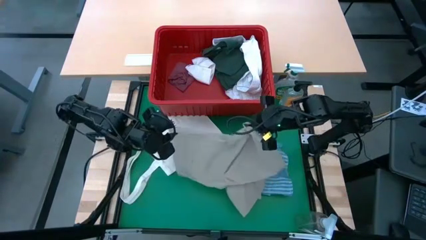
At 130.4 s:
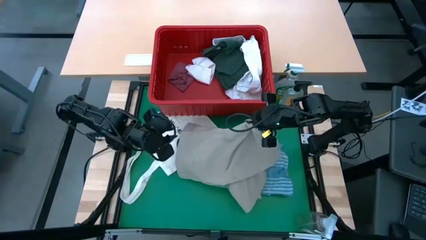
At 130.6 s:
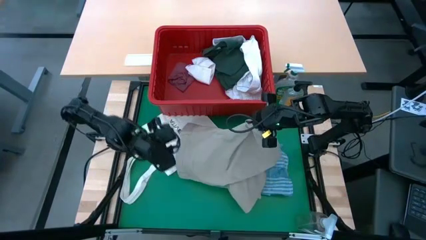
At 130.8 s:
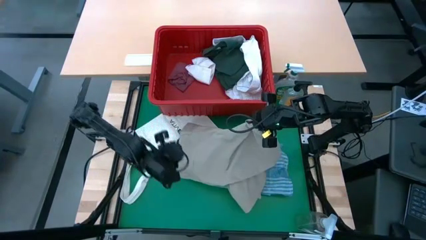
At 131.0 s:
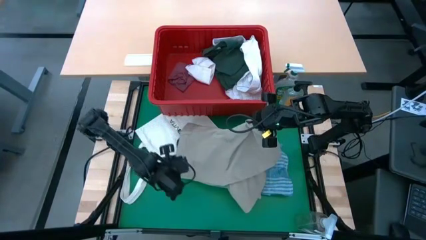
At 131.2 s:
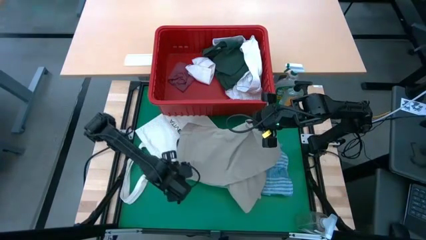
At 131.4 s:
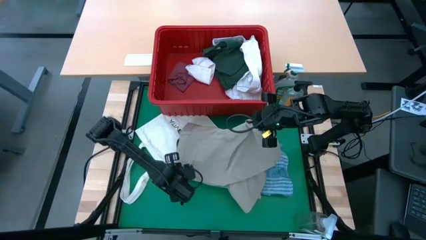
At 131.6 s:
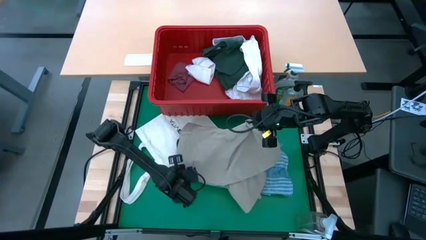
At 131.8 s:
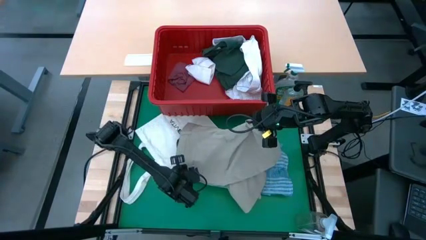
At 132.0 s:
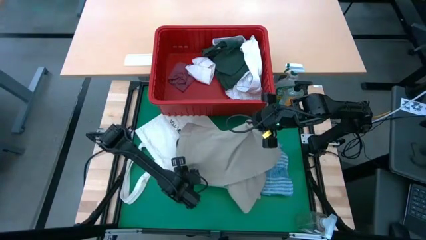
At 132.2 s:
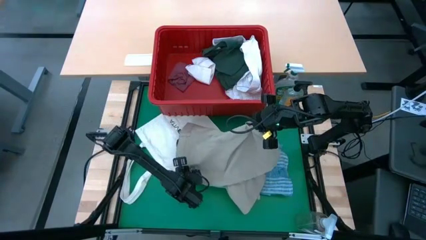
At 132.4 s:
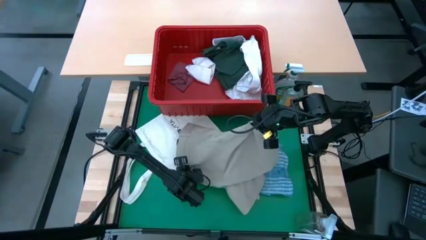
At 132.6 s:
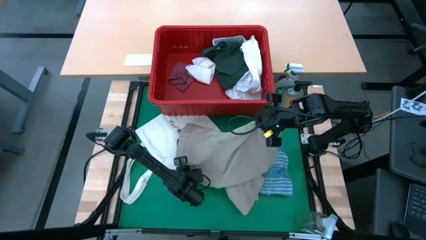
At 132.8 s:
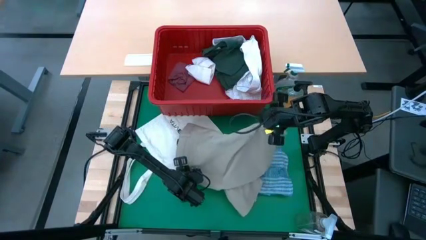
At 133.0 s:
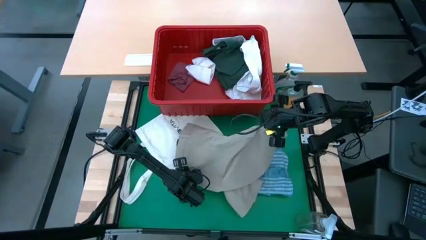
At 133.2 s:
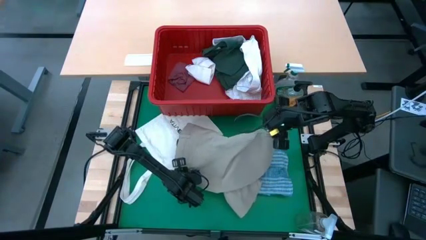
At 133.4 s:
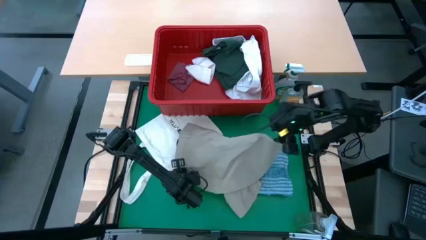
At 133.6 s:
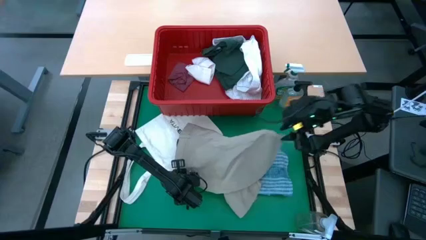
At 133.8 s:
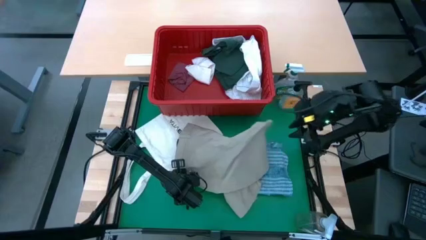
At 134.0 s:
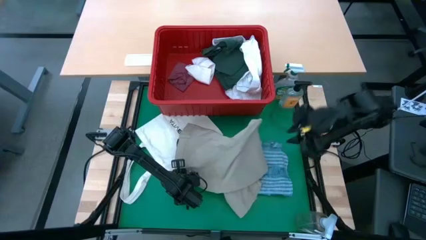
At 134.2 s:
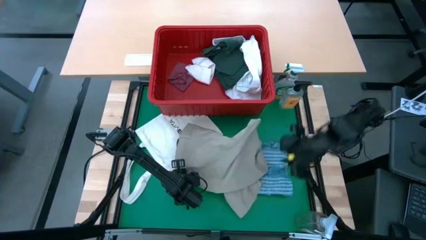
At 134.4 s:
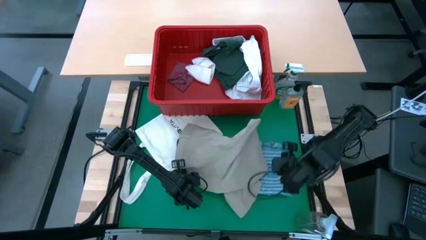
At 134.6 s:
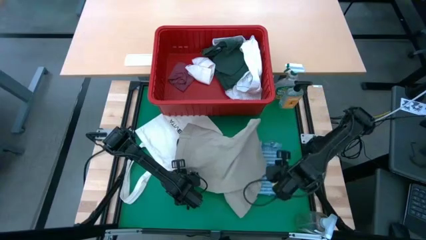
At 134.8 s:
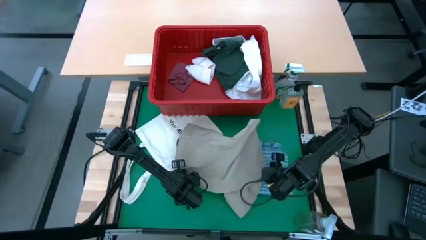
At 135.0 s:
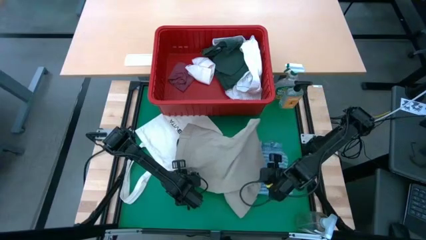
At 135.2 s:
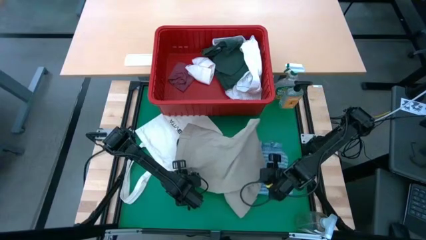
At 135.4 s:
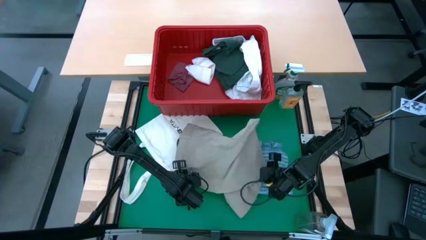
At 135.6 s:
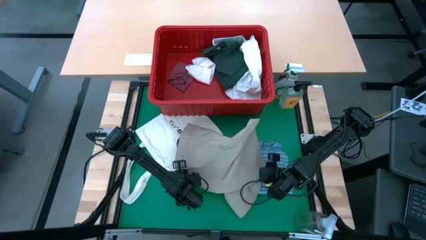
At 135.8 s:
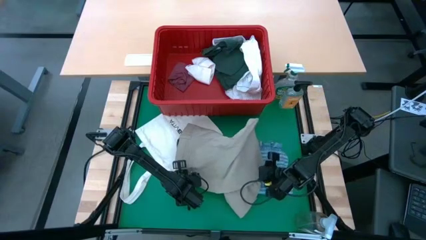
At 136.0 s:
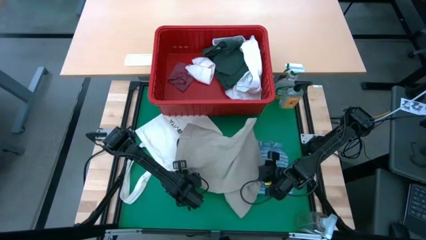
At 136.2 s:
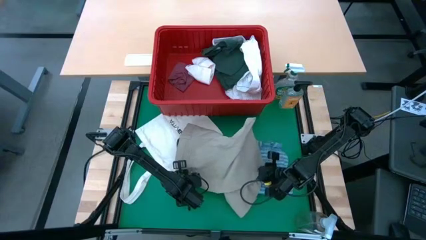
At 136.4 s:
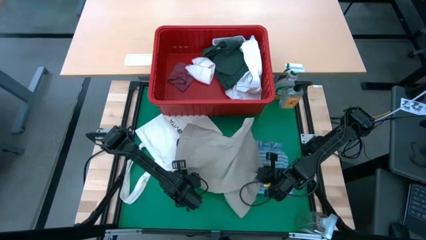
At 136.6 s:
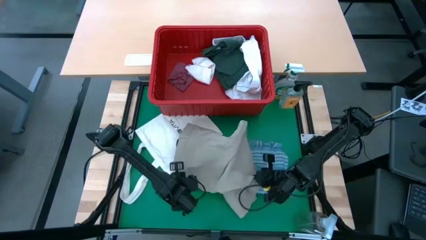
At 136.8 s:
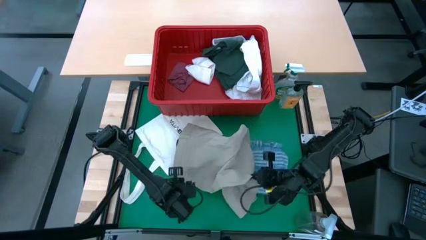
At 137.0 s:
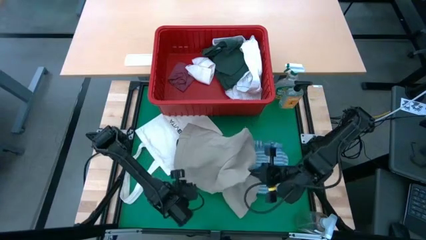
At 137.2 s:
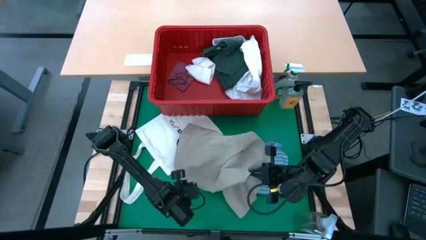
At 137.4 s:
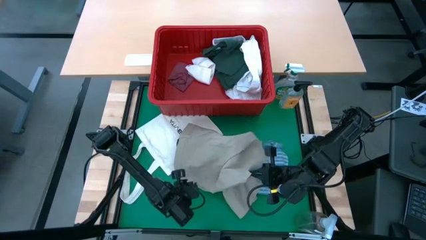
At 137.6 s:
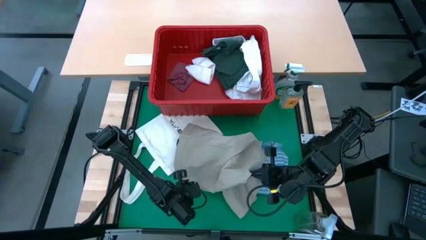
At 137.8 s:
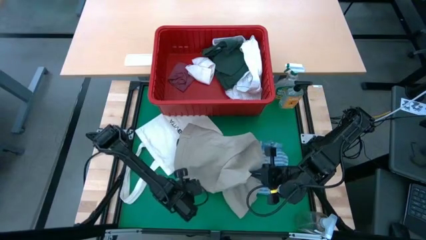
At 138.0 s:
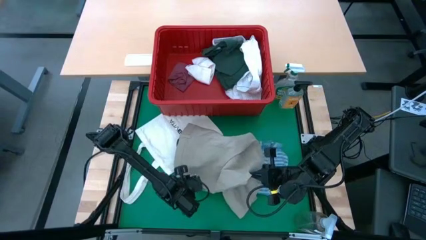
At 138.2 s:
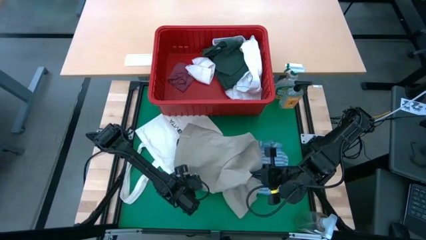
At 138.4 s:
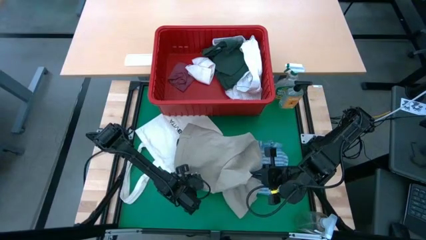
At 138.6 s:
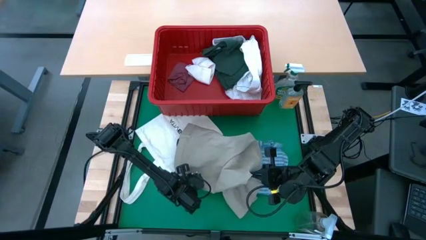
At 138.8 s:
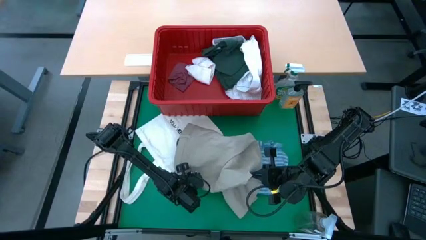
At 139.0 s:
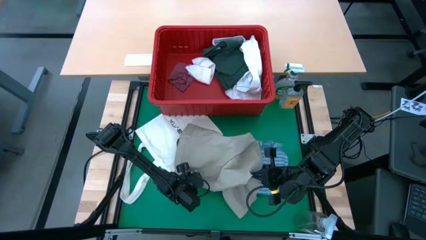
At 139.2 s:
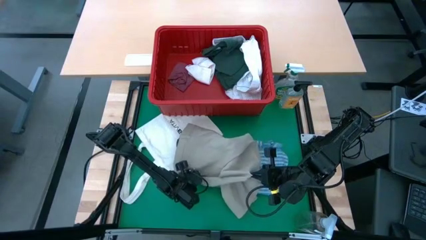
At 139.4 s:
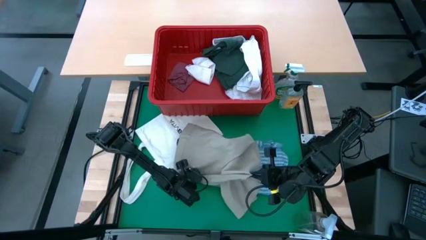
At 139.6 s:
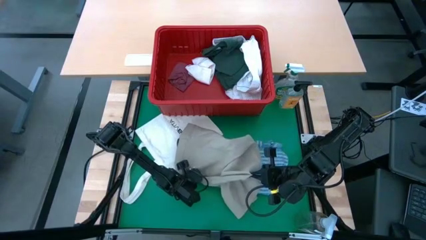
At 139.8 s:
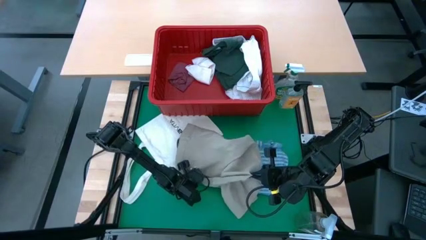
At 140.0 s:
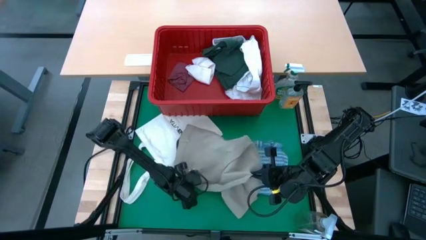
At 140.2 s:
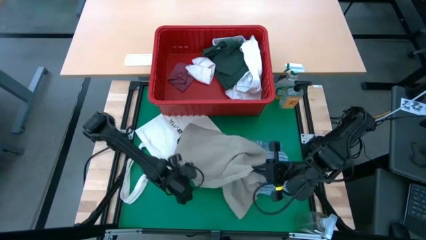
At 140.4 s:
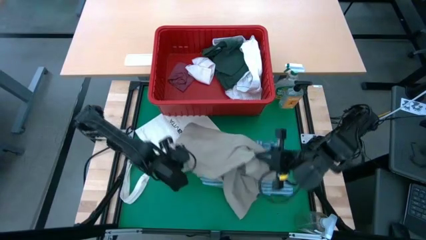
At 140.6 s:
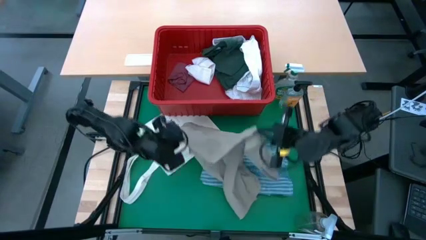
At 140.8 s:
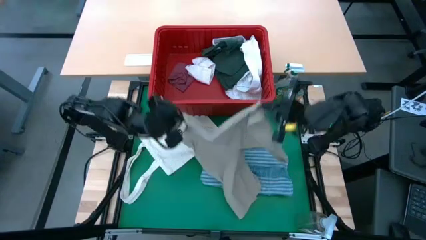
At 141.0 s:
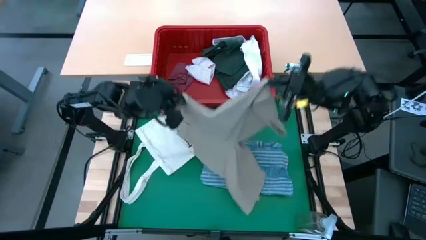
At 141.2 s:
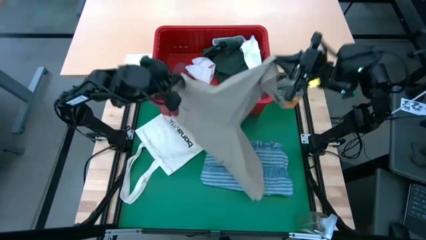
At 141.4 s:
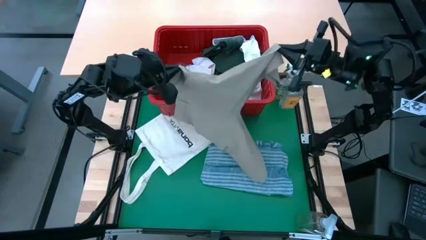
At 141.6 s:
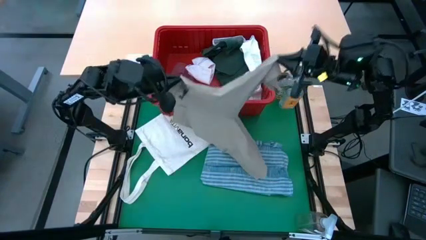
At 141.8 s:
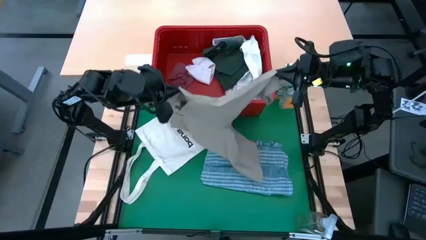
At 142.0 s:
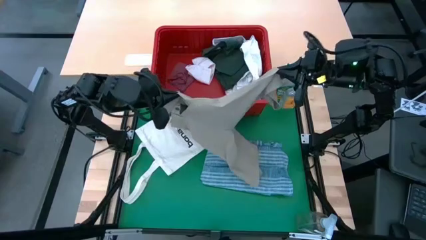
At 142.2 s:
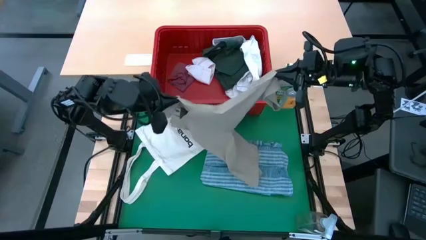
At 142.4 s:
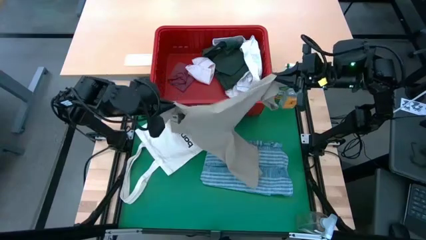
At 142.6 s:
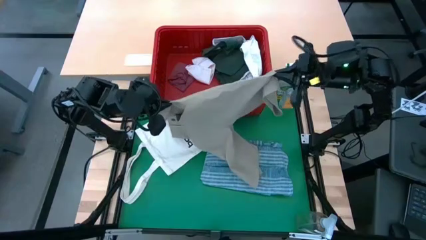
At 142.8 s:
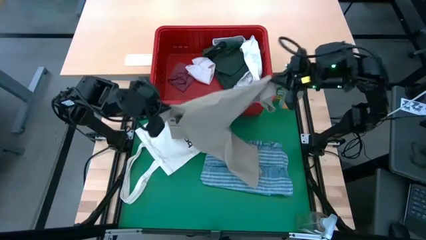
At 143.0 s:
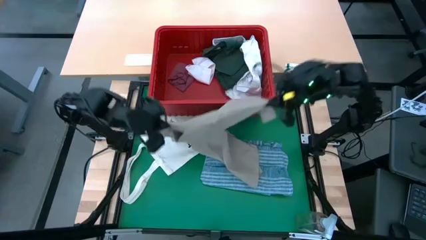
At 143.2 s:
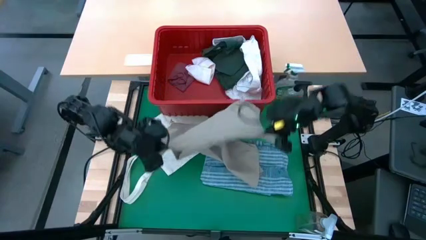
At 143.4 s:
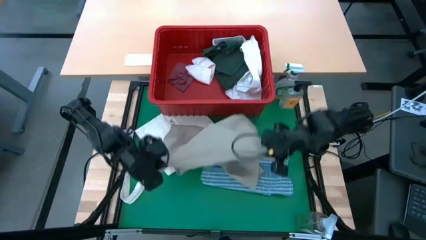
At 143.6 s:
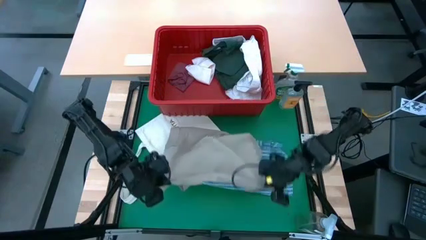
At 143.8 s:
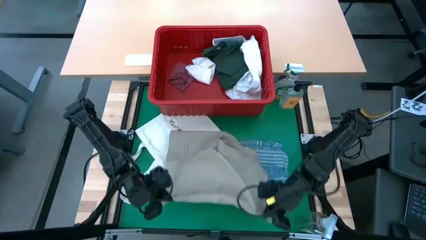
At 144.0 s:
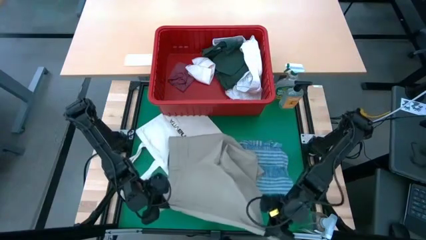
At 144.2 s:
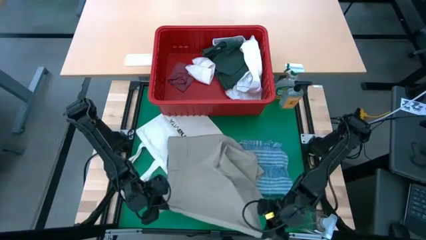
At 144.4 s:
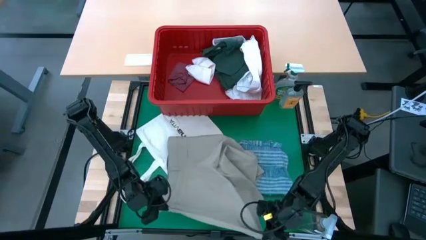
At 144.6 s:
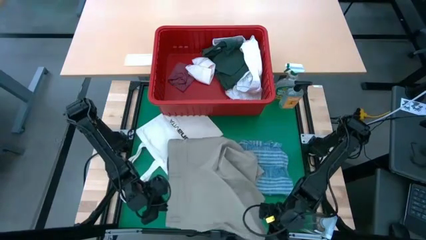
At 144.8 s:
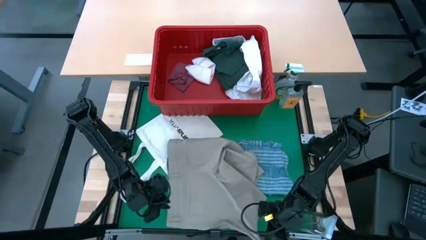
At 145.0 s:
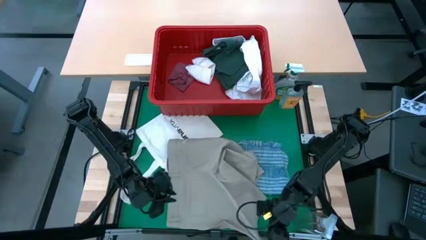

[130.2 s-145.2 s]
Task: Fold Laundry from Bin
Fold the brown shorts
